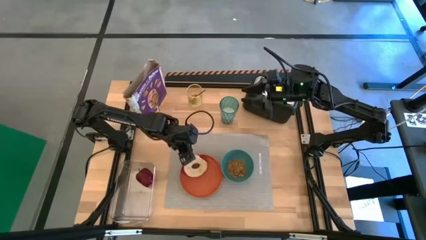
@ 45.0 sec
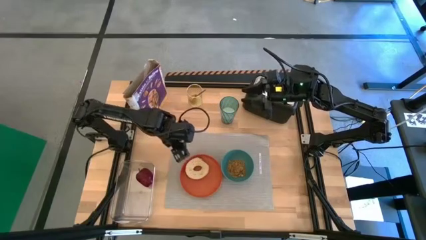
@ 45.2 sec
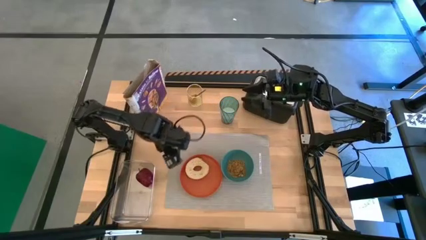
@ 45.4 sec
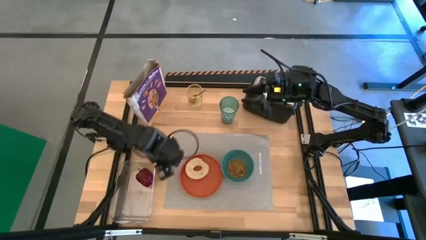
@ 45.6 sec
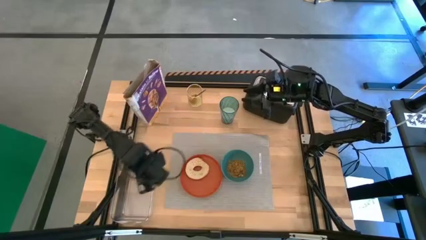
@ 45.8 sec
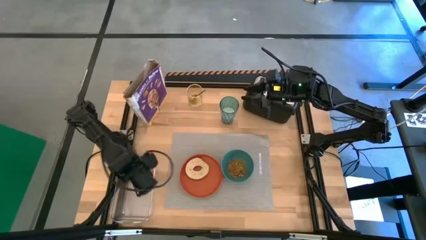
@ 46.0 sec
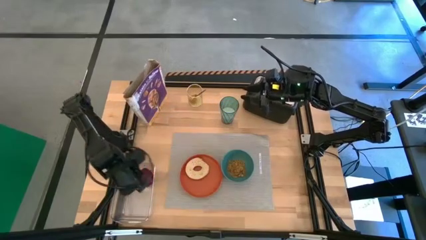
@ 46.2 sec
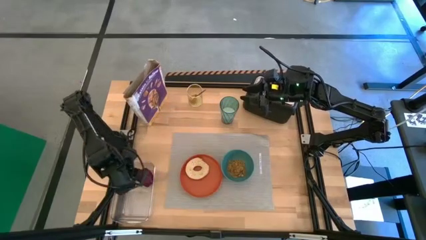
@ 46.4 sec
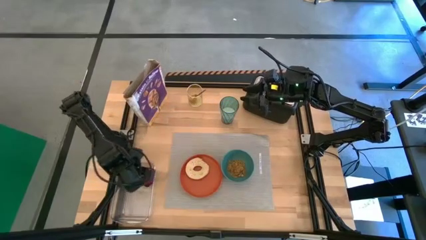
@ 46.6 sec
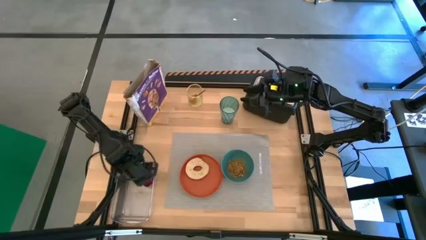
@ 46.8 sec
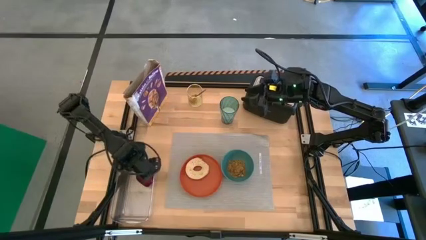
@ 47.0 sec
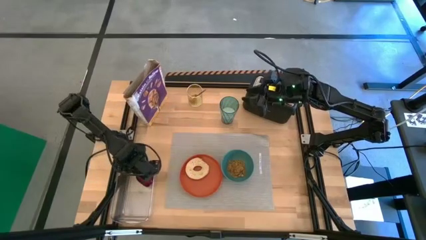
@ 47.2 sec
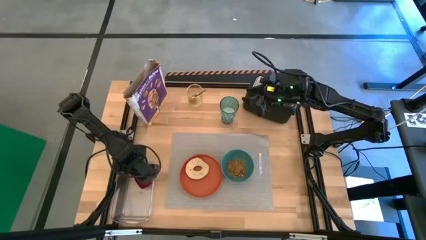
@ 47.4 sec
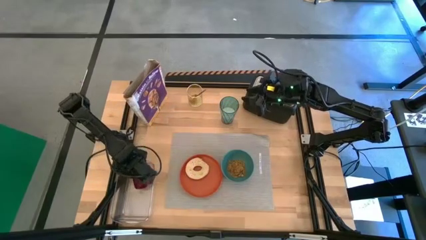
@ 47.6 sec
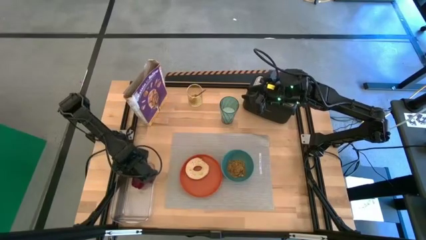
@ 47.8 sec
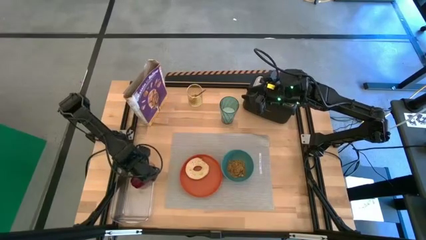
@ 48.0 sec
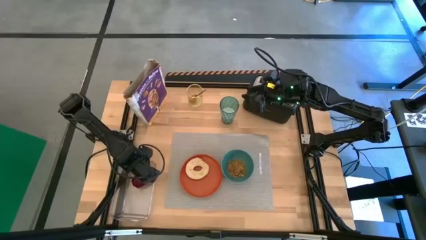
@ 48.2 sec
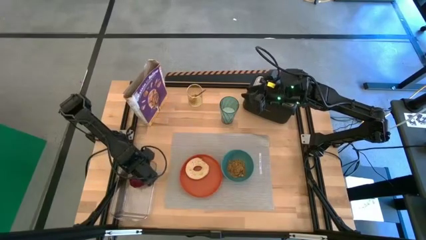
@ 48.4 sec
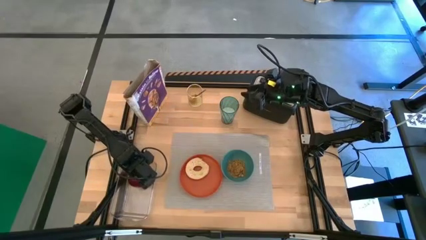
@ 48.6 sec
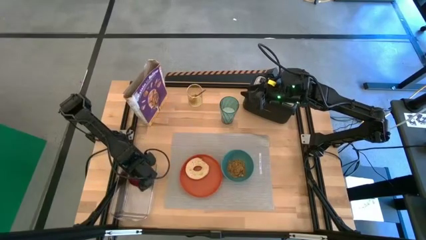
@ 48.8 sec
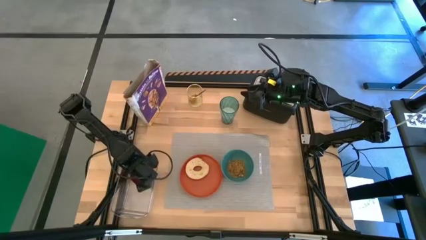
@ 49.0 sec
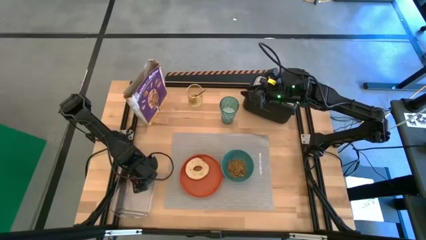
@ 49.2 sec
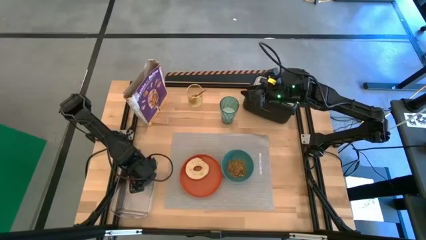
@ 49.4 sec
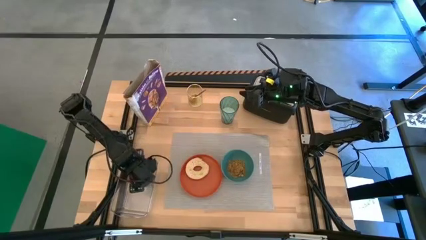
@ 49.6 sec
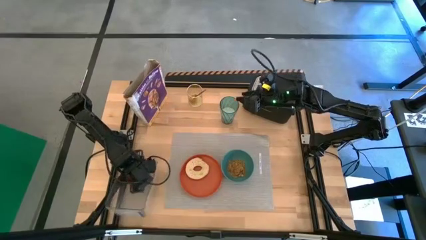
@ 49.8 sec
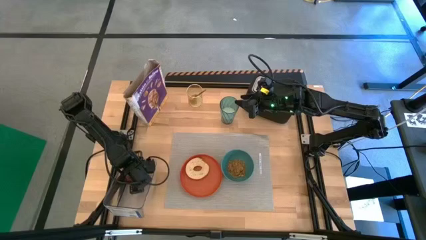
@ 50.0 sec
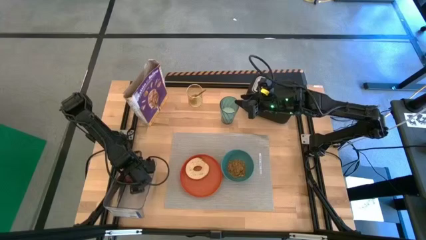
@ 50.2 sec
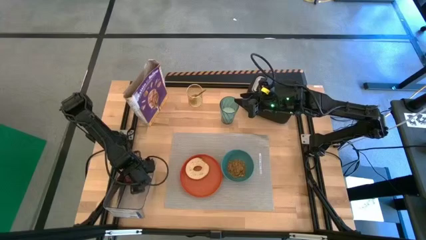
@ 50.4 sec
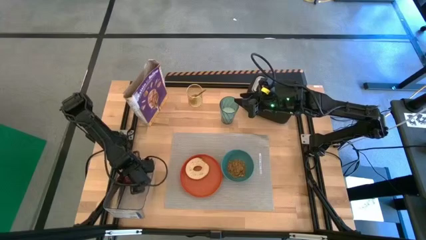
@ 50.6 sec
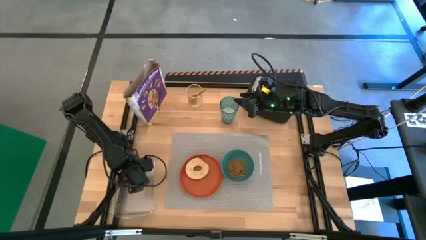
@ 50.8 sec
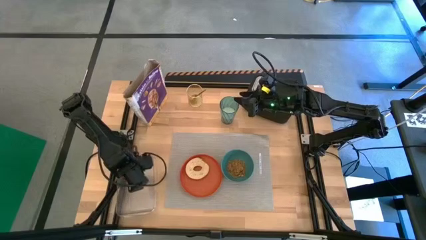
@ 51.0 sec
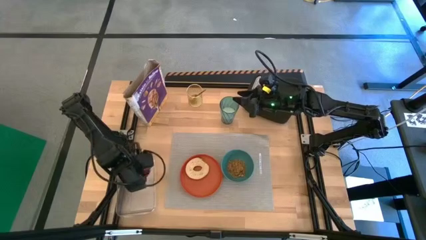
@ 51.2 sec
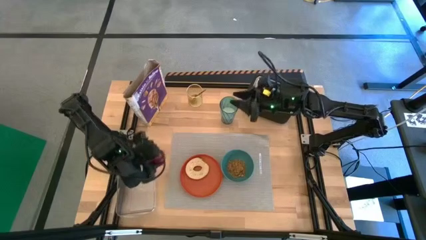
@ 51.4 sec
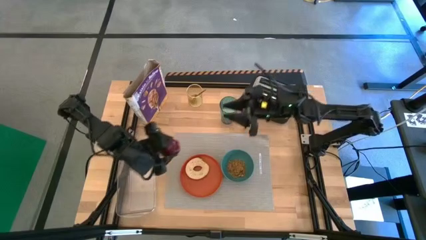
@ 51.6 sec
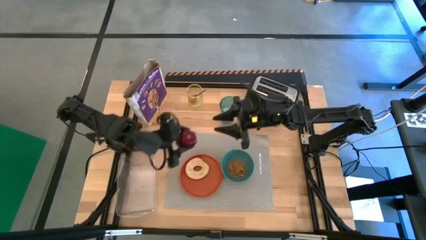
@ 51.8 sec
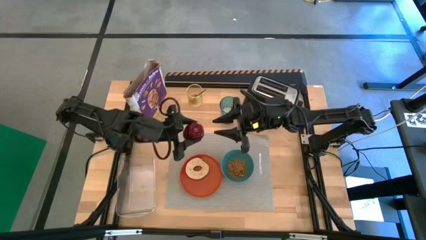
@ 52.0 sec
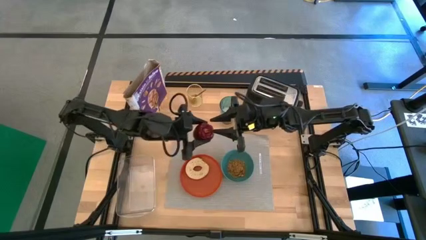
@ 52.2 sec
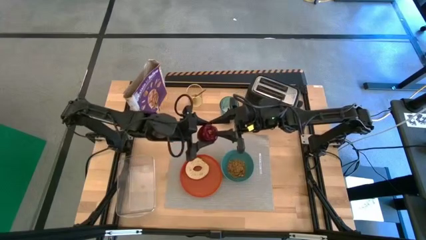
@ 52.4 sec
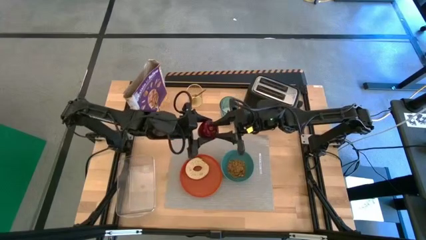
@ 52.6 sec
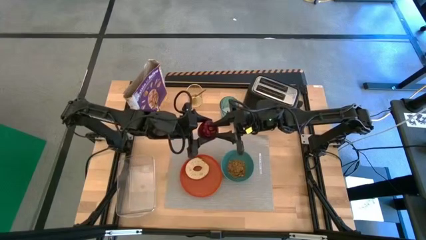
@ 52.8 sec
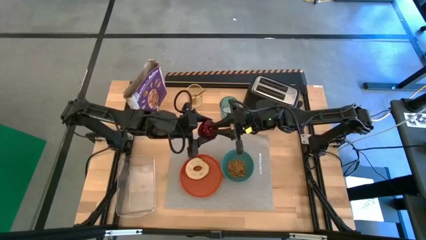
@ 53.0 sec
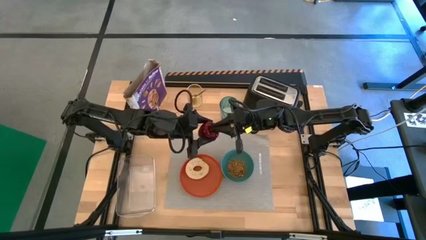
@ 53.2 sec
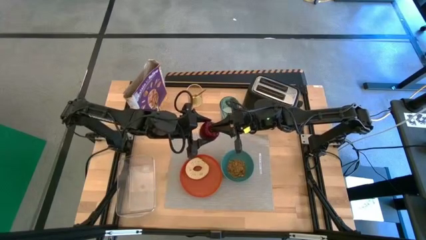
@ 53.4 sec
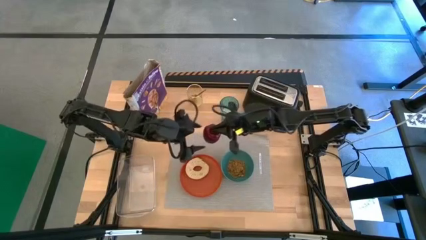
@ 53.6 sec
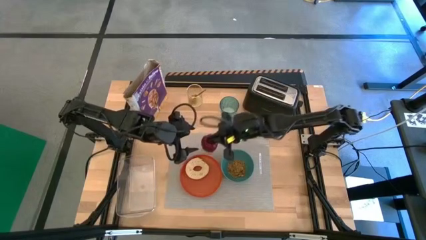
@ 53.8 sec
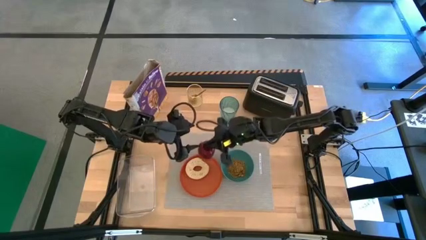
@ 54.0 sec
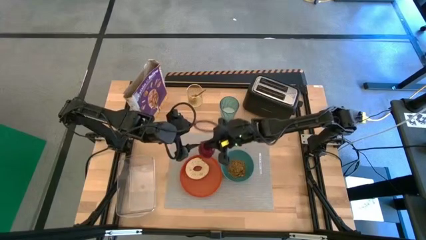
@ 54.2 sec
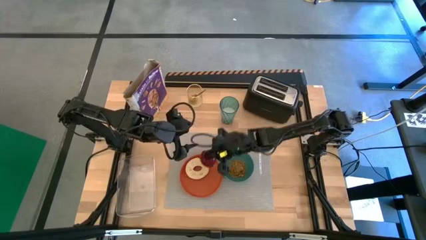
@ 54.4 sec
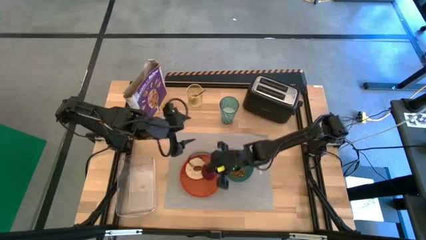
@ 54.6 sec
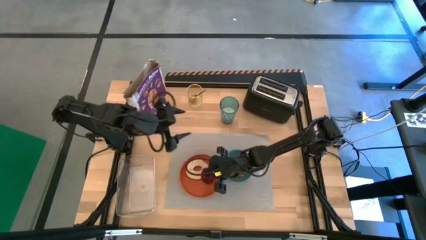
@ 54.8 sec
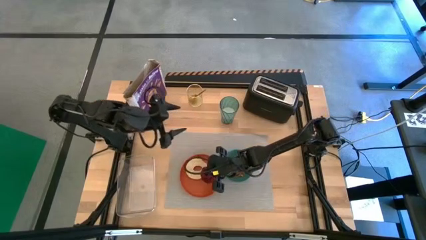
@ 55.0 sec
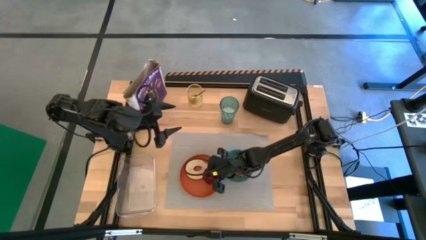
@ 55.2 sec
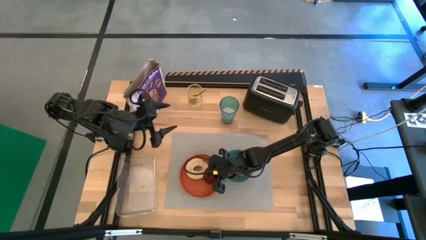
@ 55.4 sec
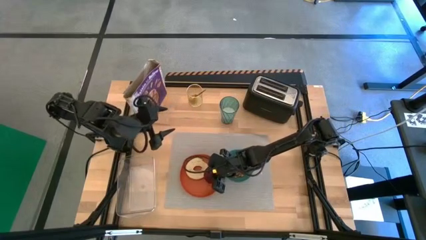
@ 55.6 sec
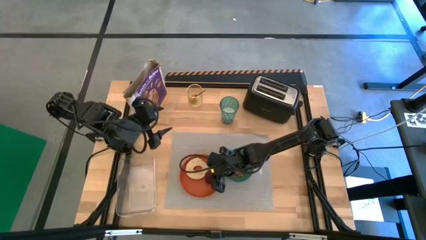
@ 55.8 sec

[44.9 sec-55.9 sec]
Task: Arrange a breakfast setting
Put the apple on the orange plate from the transparent bin

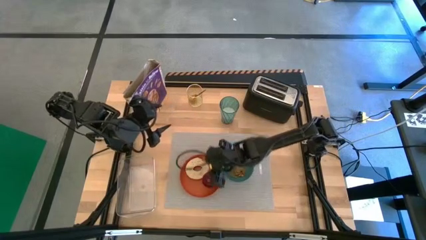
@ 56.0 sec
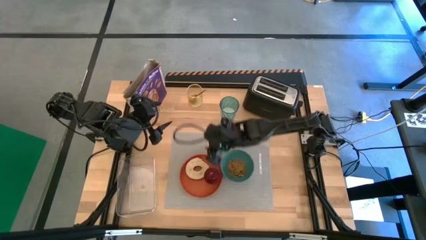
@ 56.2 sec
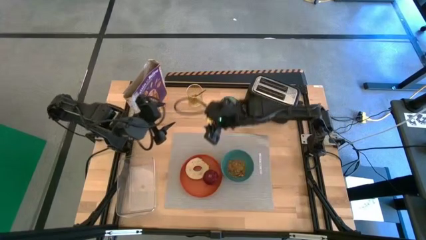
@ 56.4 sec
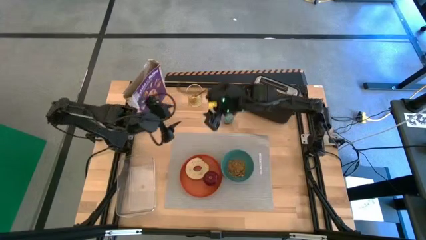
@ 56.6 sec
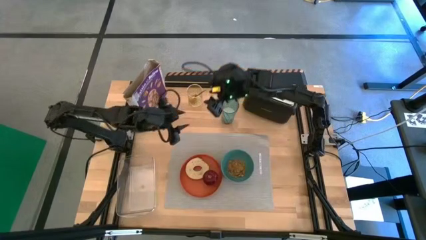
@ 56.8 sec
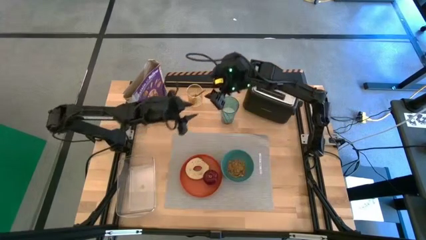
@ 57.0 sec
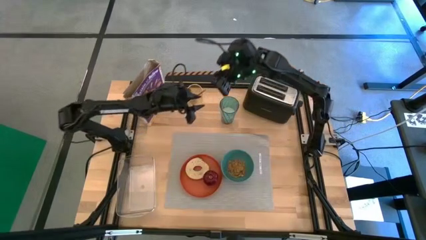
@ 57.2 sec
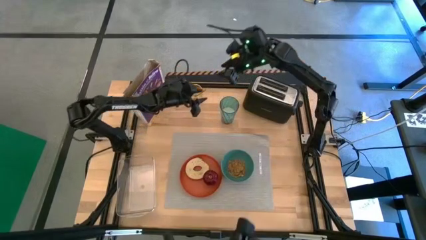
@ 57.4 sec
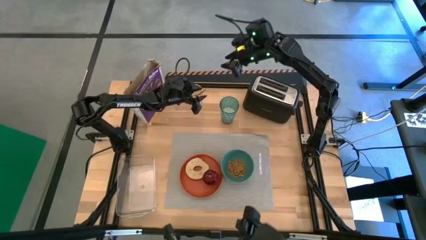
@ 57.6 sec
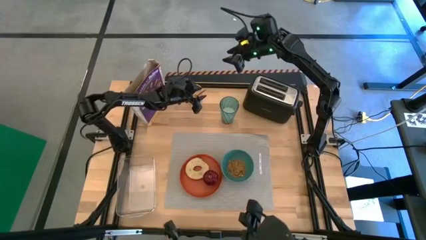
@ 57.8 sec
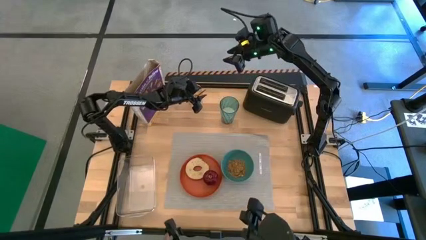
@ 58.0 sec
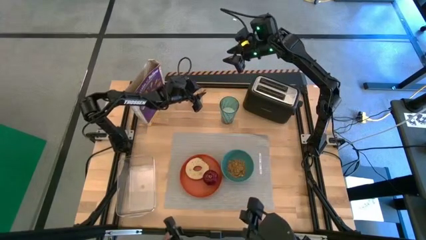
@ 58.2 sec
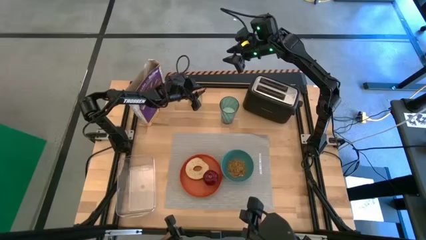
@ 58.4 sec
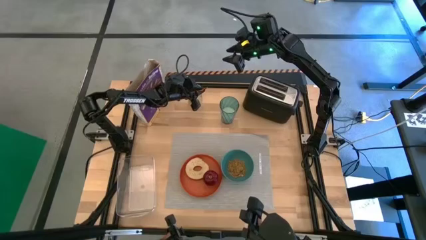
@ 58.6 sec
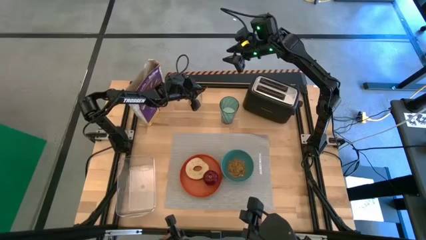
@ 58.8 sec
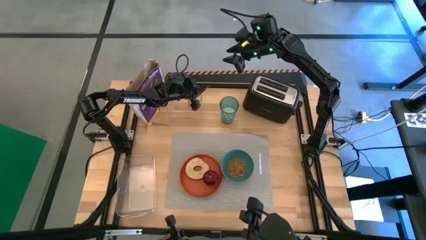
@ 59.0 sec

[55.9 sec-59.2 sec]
Put the spoon beside the blue bowl on the placemat
